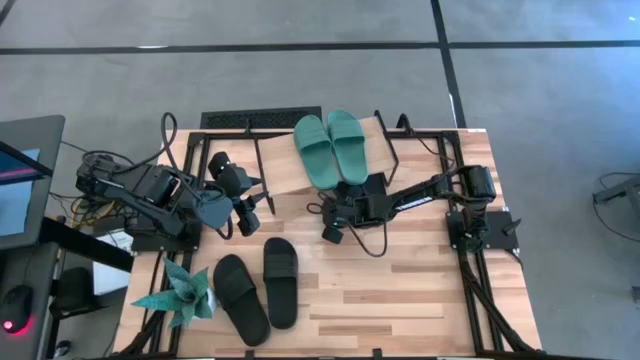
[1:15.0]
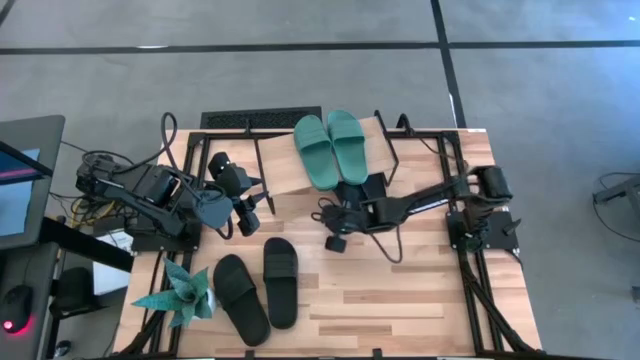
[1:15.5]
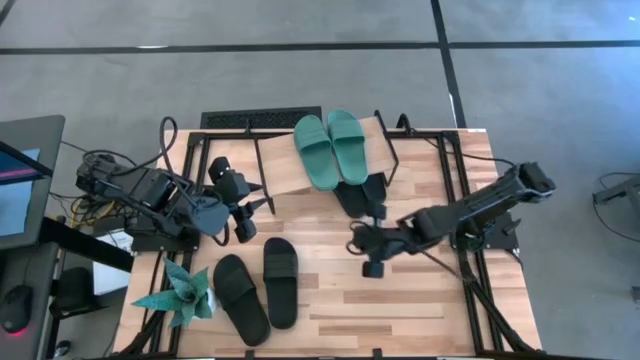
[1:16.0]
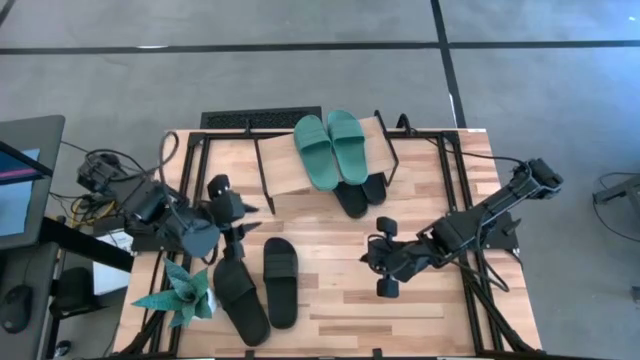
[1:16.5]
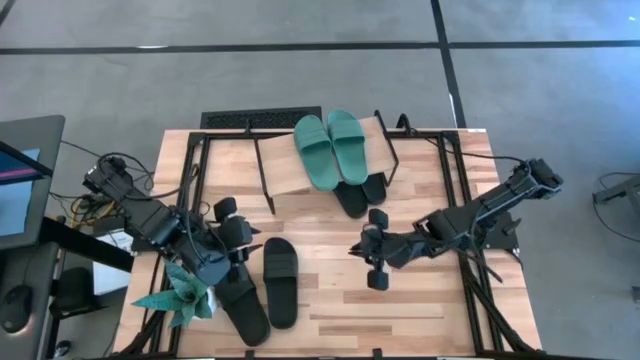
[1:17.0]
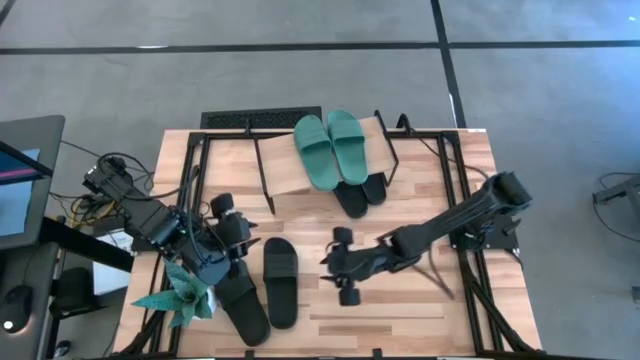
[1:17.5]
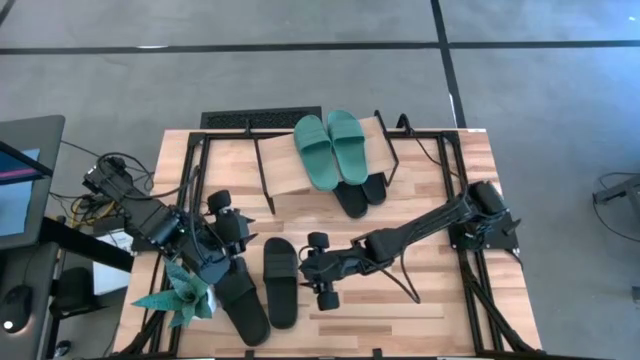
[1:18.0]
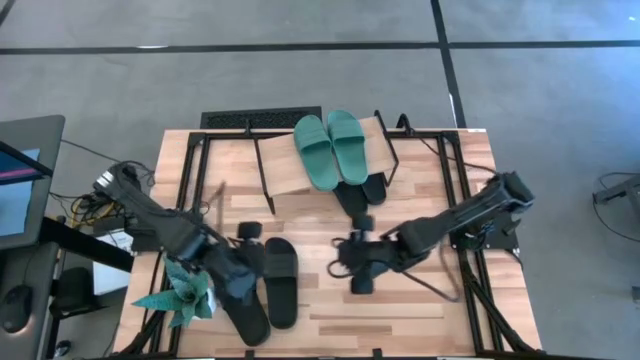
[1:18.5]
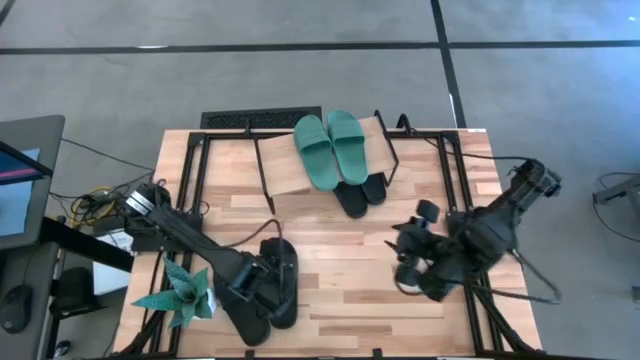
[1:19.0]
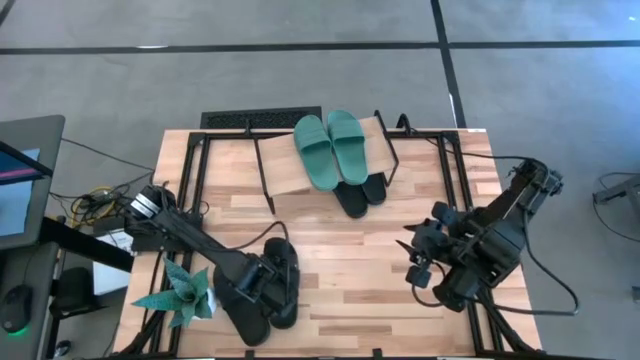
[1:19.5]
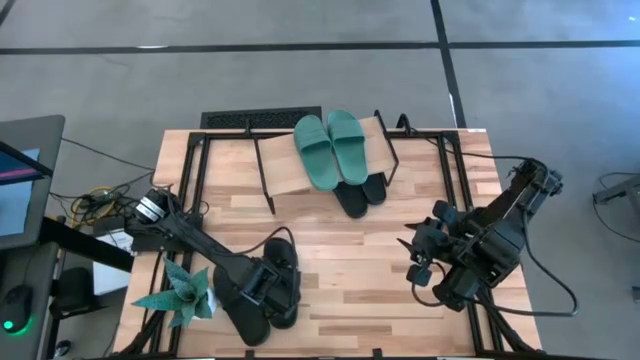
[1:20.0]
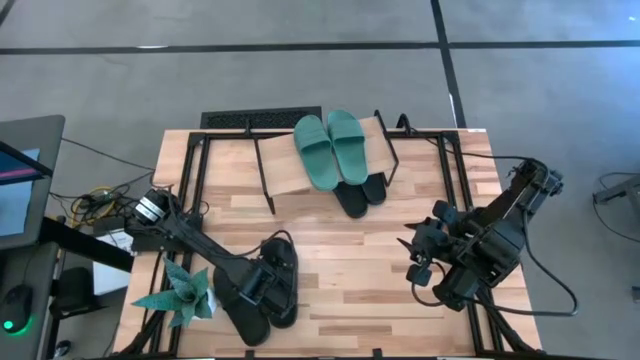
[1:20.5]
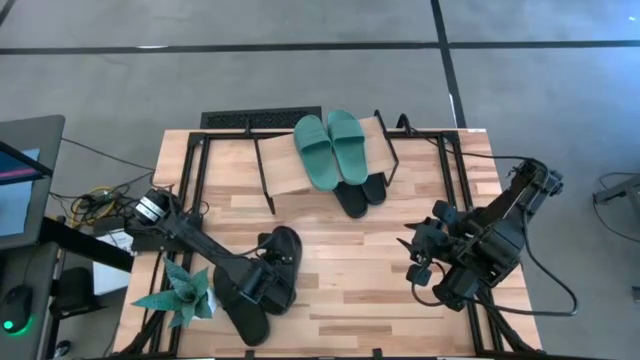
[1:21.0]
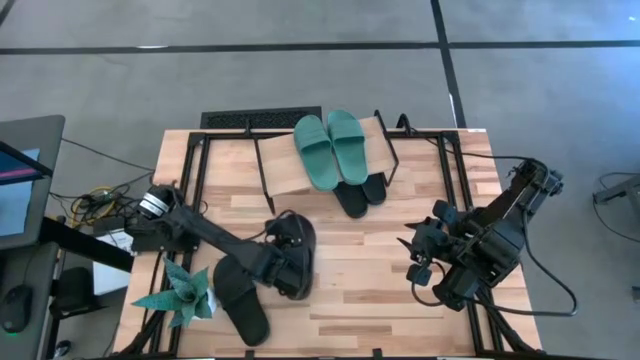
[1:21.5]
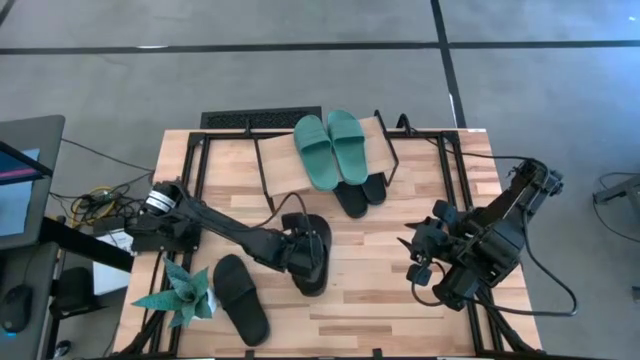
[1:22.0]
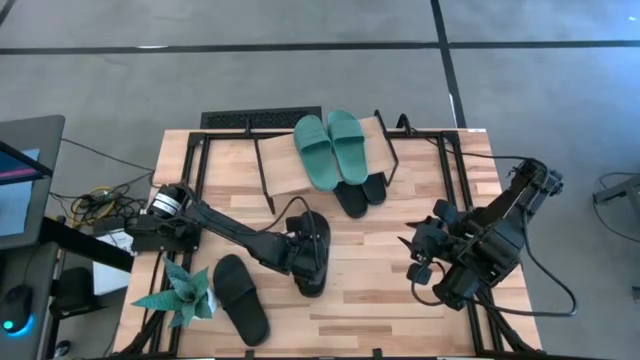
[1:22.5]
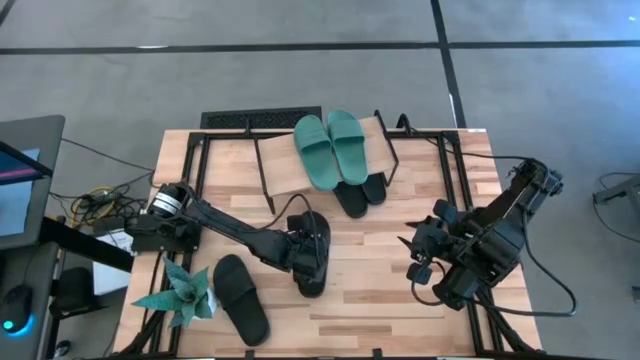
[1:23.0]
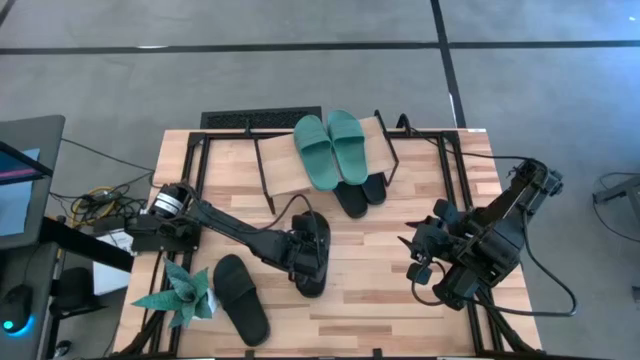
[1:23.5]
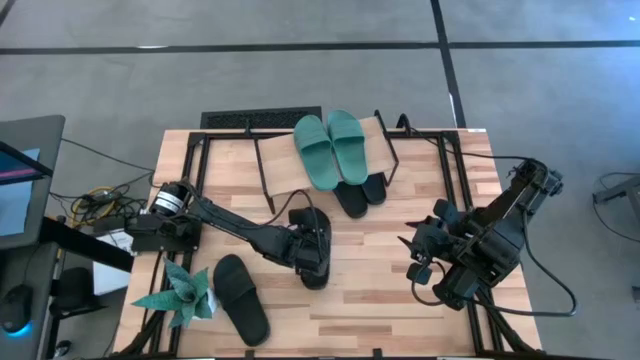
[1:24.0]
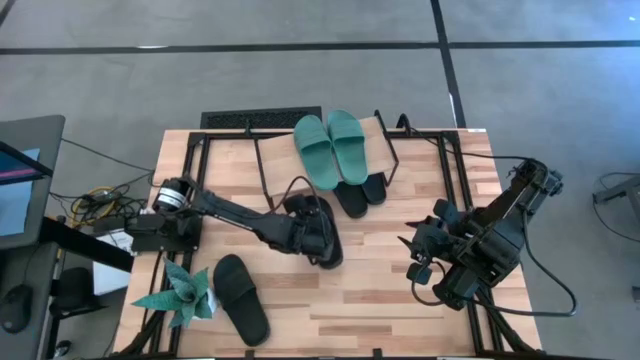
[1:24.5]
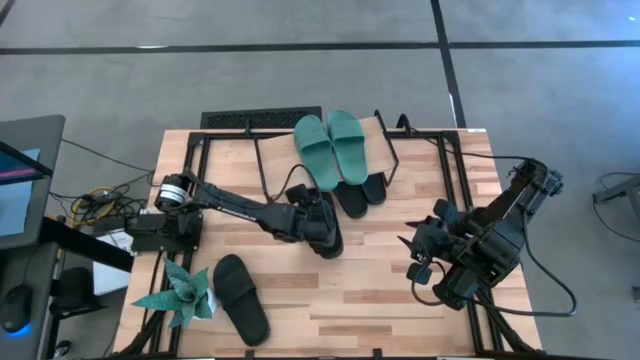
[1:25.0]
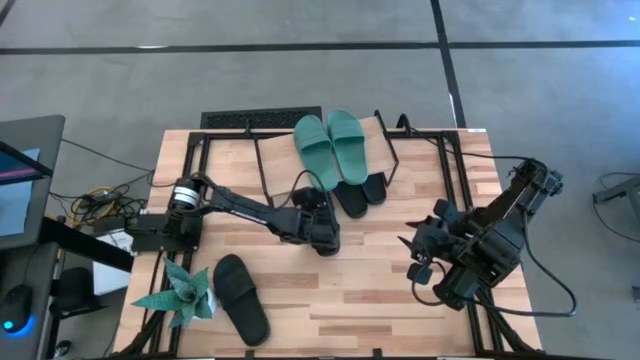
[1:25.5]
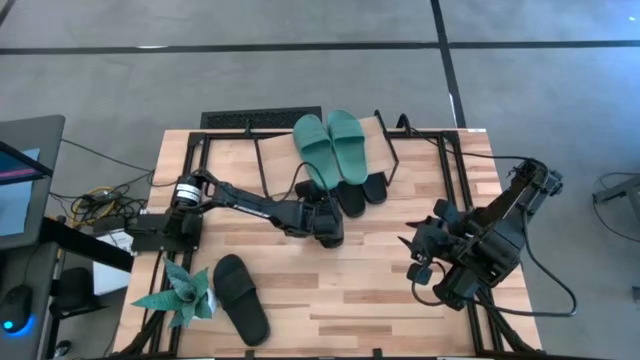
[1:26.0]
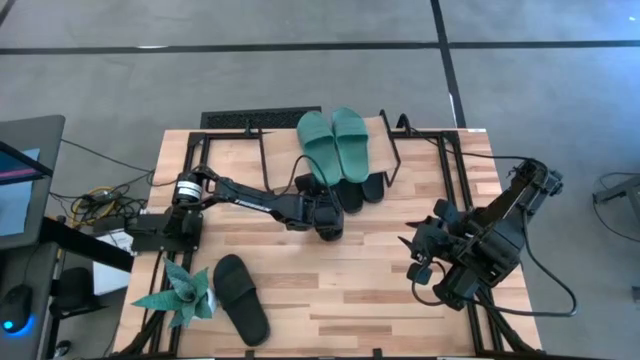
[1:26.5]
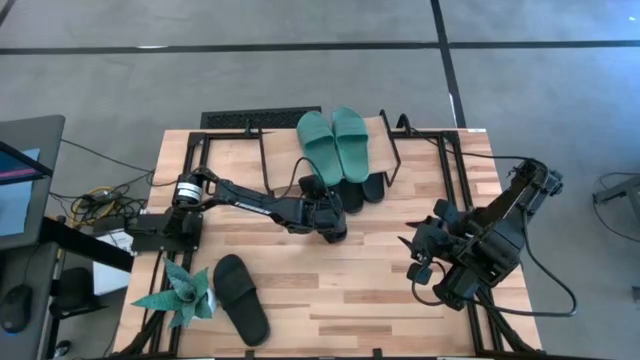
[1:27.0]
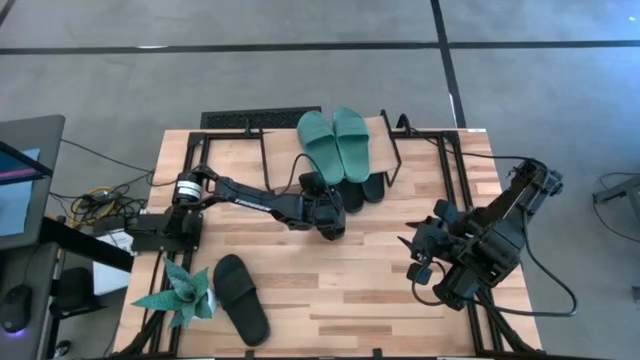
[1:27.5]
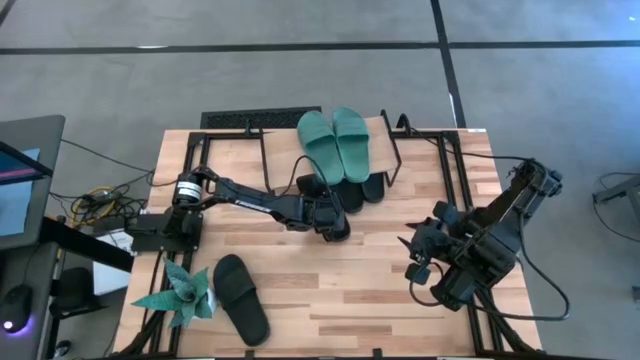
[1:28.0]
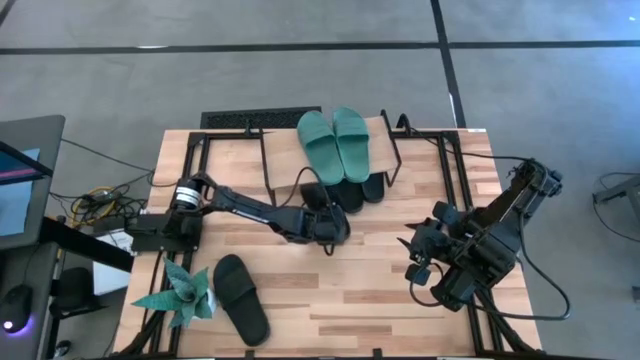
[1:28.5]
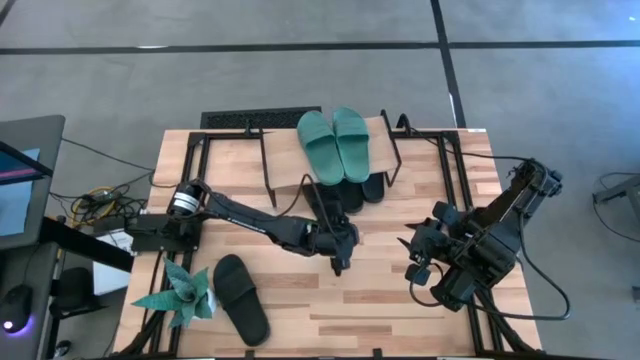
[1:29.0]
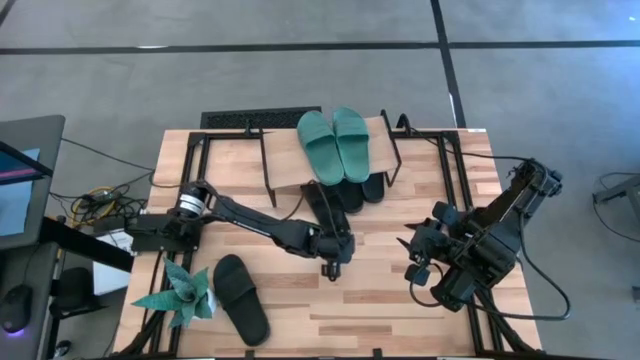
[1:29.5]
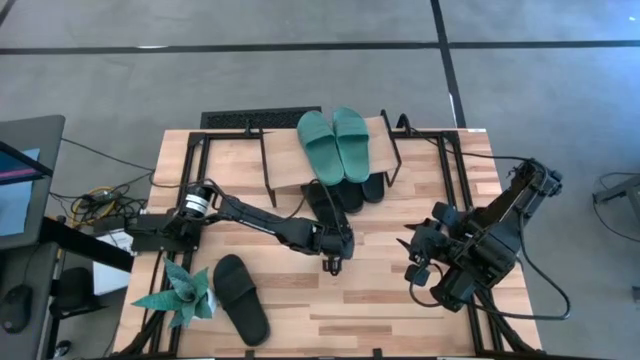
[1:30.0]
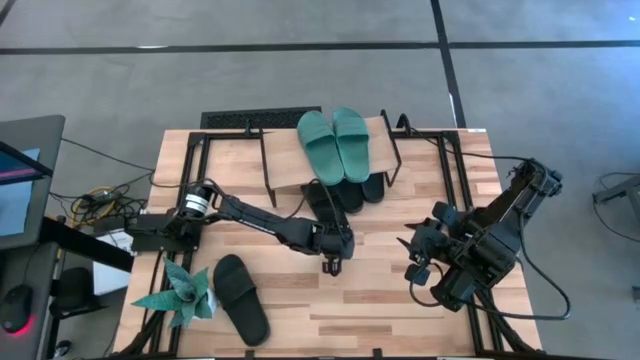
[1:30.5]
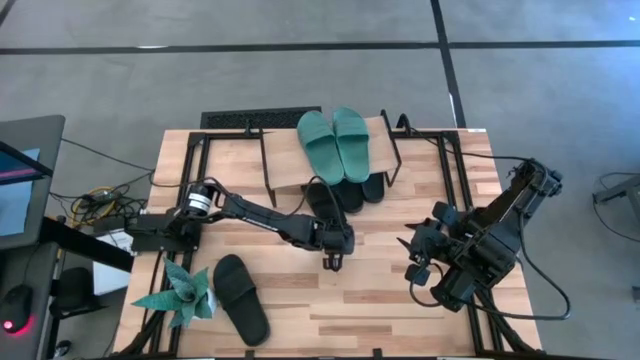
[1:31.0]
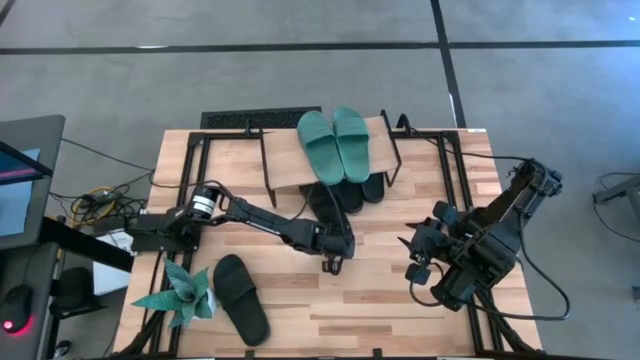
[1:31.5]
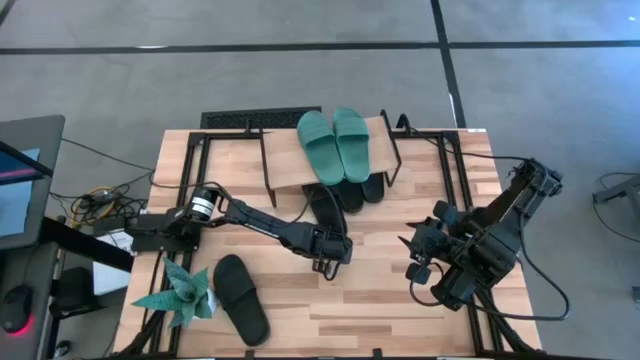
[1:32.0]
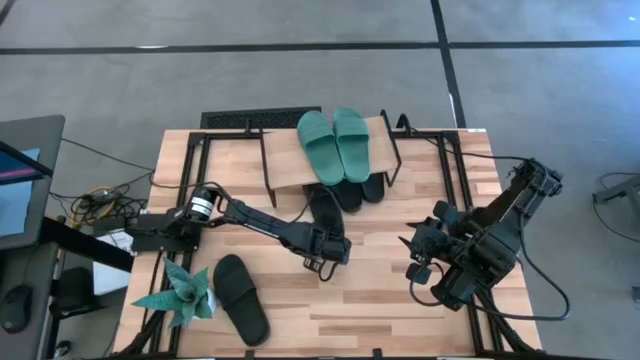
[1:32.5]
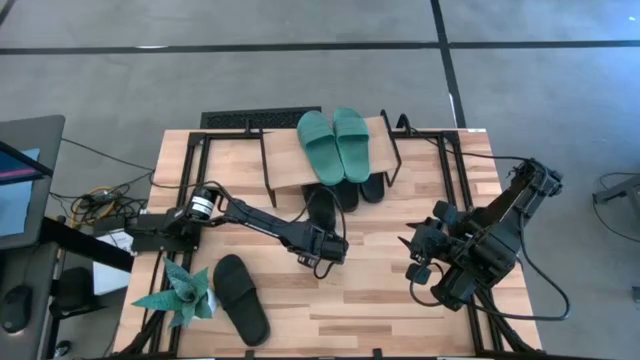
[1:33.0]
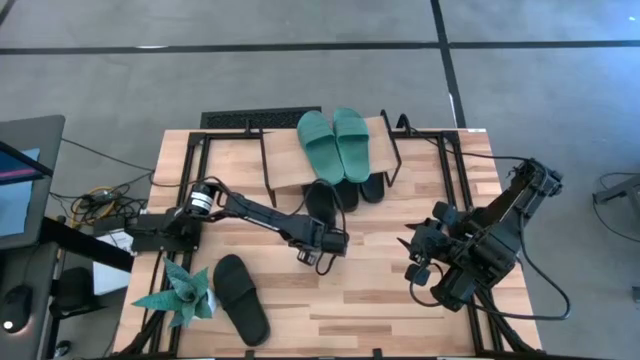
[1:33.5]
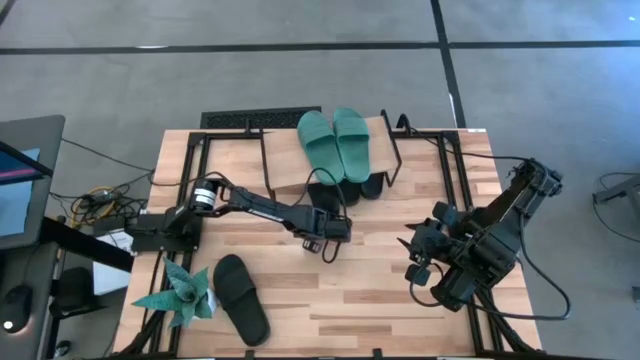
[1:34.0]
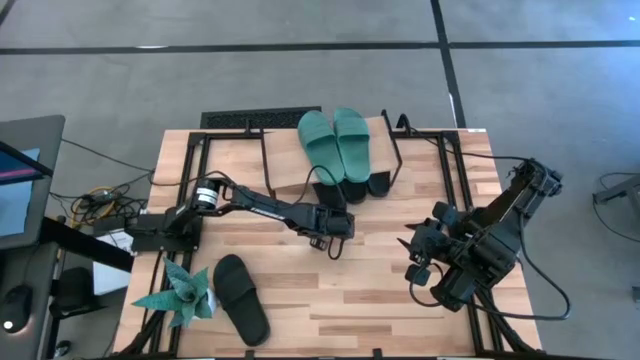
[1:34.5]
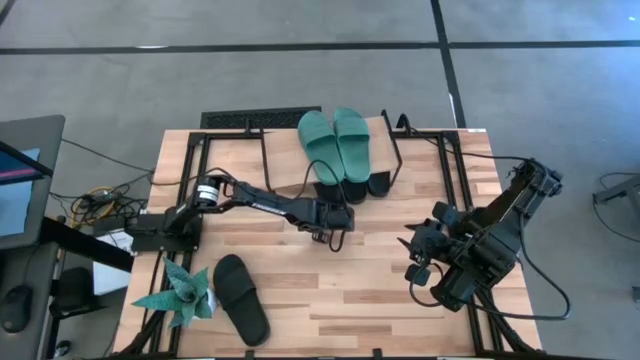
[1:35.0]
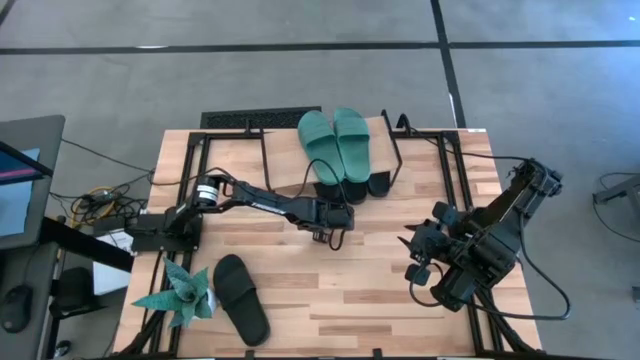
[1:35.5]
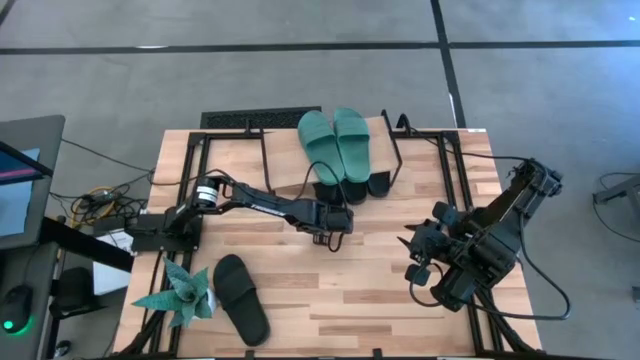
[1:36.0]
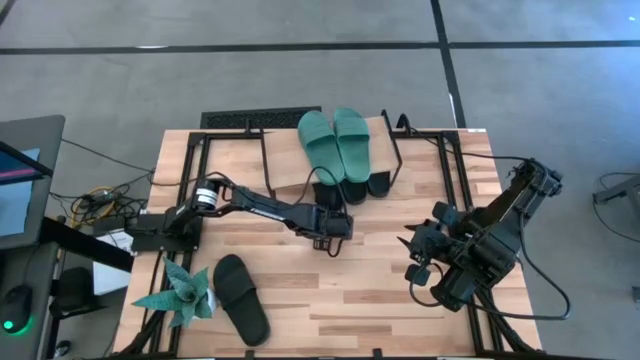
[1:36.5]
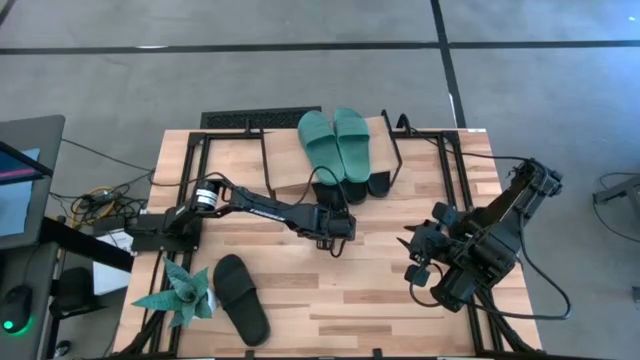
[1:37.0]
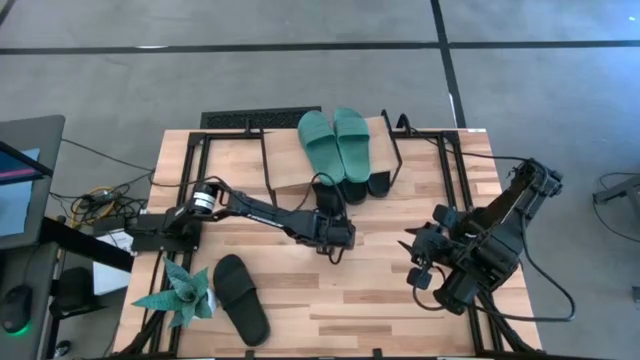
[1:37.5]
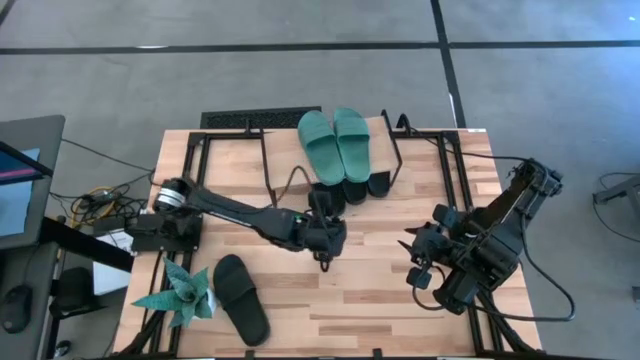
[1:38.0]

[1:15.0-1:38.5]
Task: Pick and place slides into the shelf
Put the black slide under the shelf
